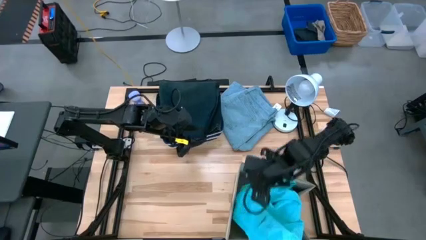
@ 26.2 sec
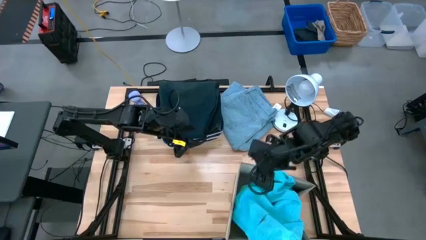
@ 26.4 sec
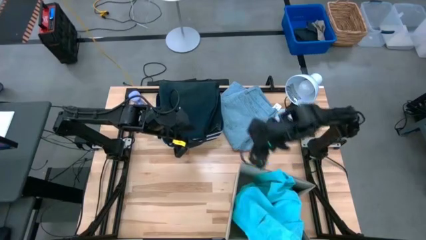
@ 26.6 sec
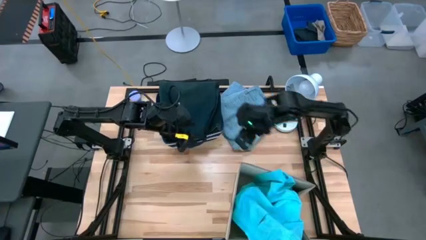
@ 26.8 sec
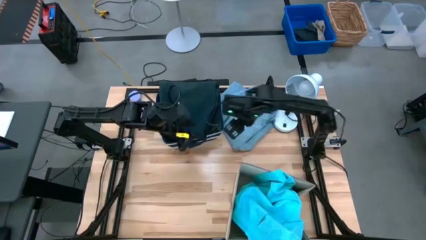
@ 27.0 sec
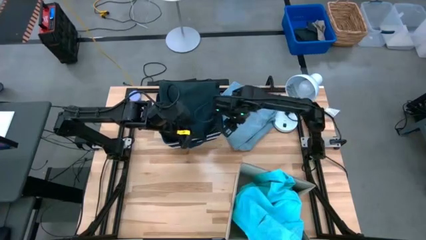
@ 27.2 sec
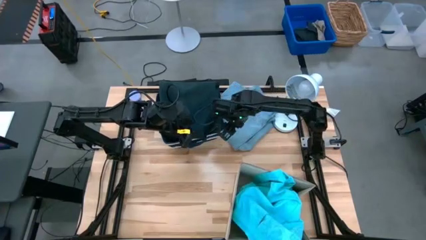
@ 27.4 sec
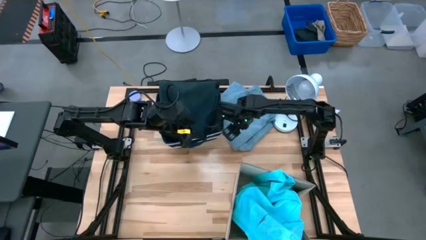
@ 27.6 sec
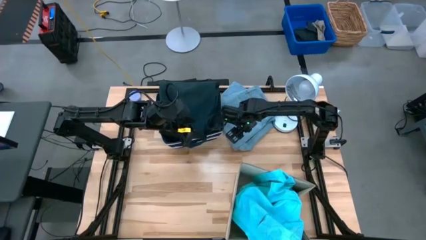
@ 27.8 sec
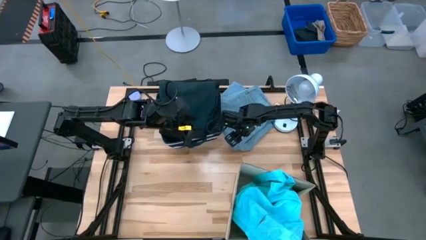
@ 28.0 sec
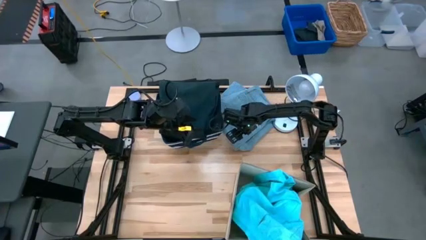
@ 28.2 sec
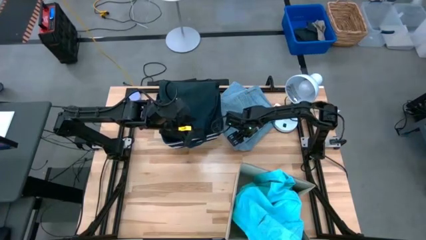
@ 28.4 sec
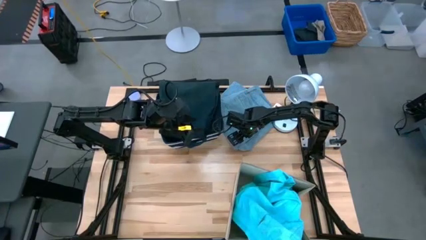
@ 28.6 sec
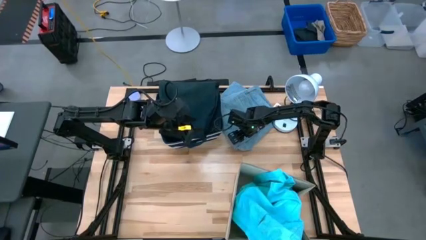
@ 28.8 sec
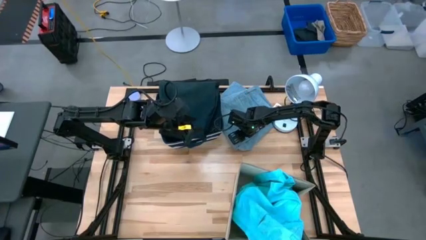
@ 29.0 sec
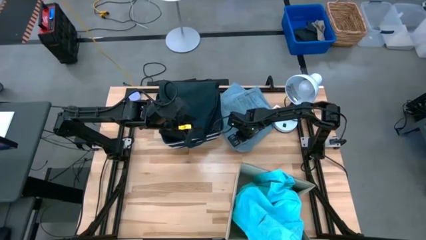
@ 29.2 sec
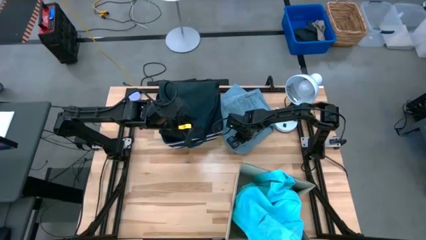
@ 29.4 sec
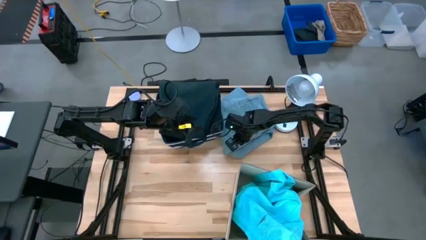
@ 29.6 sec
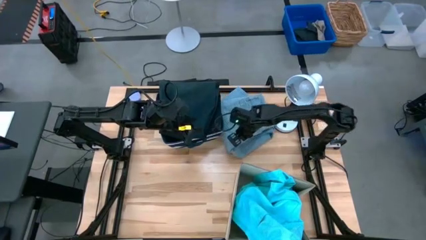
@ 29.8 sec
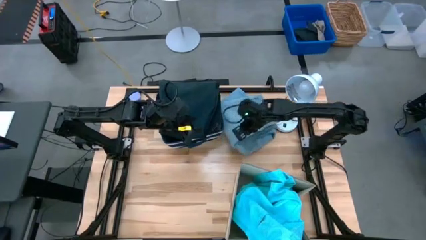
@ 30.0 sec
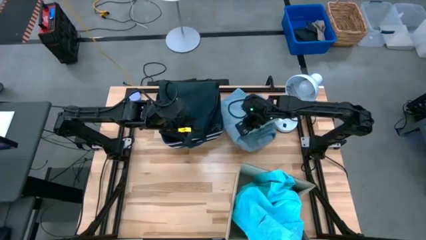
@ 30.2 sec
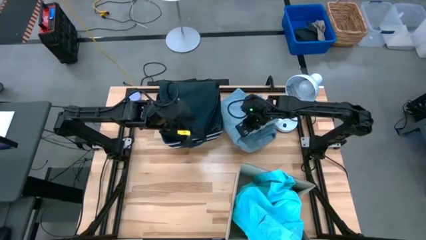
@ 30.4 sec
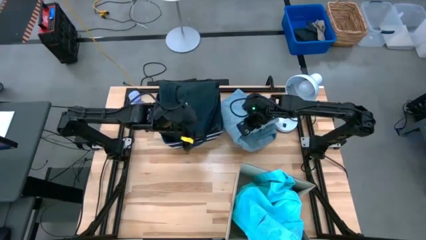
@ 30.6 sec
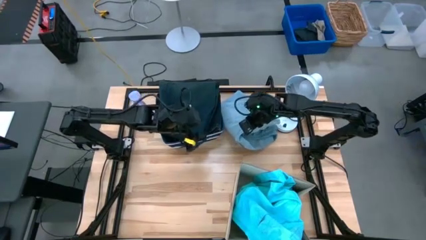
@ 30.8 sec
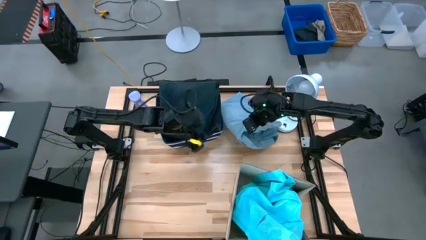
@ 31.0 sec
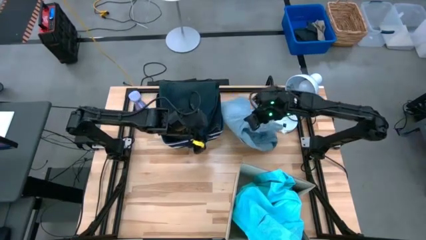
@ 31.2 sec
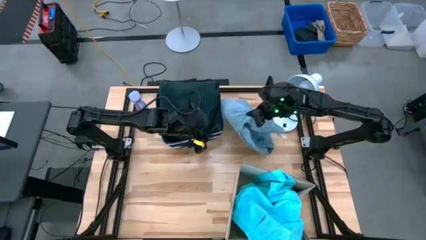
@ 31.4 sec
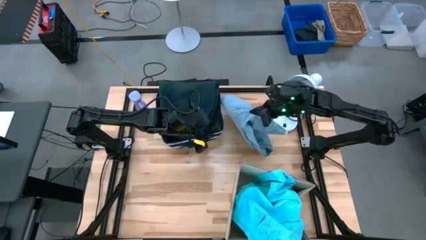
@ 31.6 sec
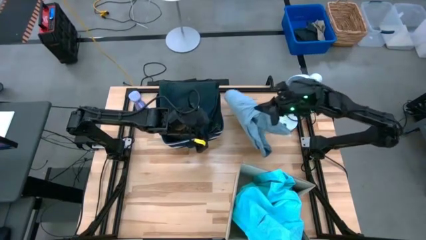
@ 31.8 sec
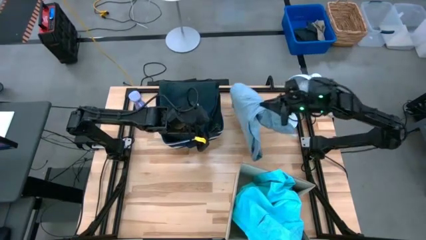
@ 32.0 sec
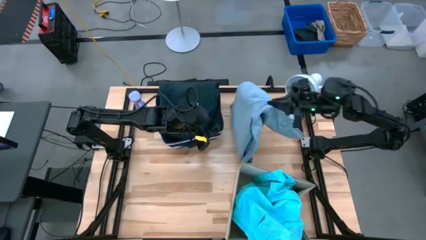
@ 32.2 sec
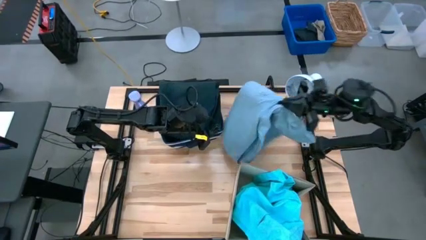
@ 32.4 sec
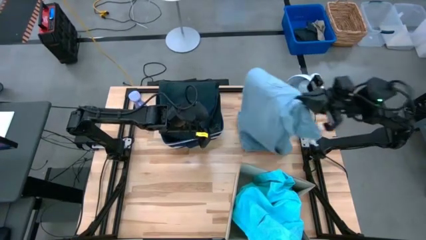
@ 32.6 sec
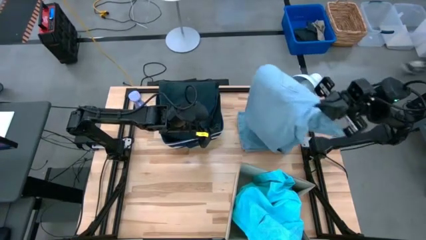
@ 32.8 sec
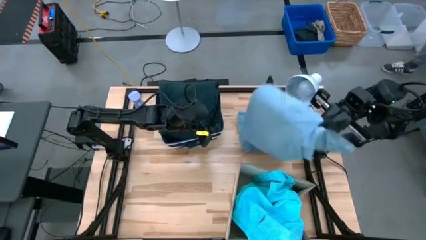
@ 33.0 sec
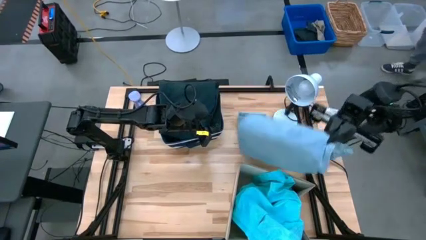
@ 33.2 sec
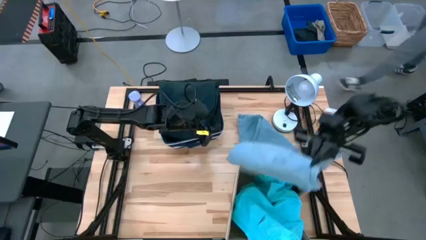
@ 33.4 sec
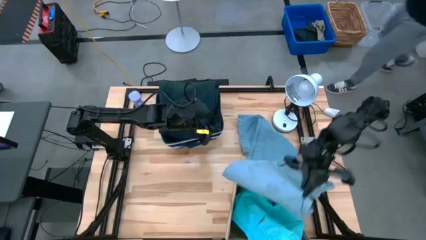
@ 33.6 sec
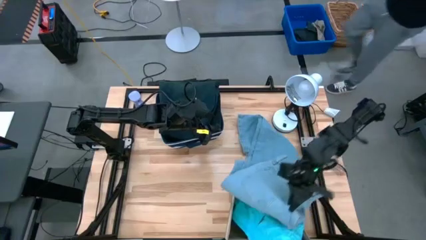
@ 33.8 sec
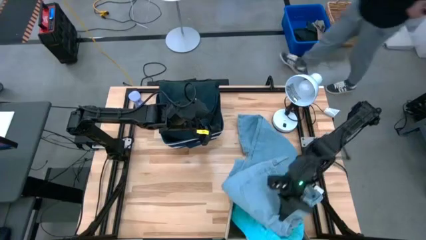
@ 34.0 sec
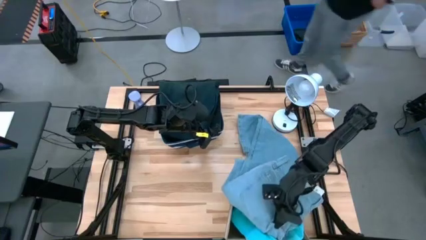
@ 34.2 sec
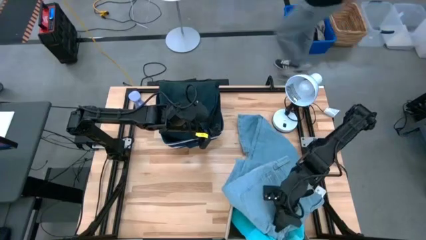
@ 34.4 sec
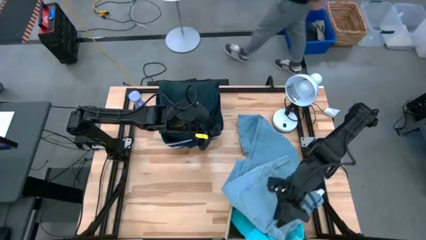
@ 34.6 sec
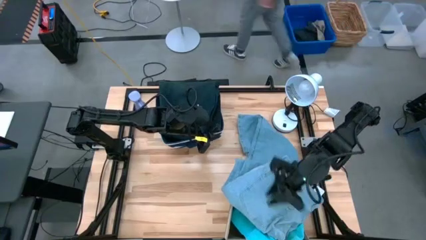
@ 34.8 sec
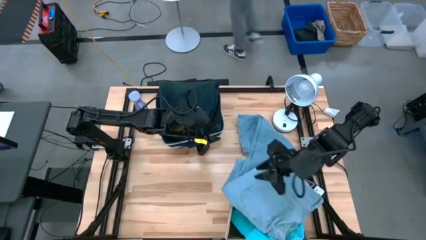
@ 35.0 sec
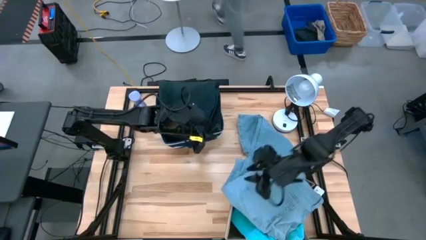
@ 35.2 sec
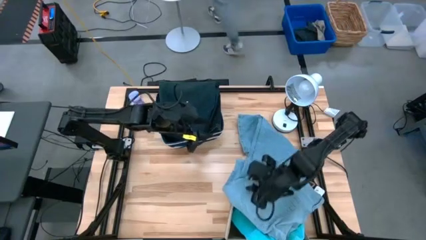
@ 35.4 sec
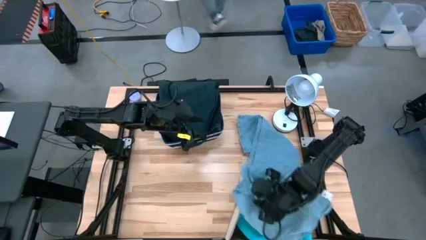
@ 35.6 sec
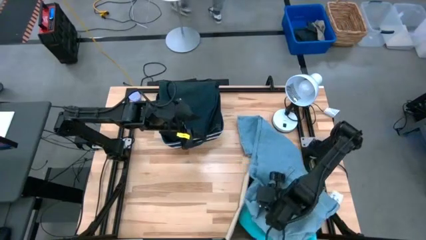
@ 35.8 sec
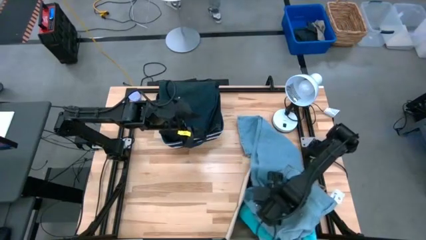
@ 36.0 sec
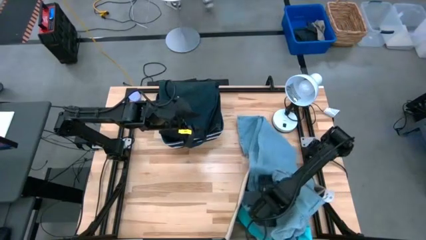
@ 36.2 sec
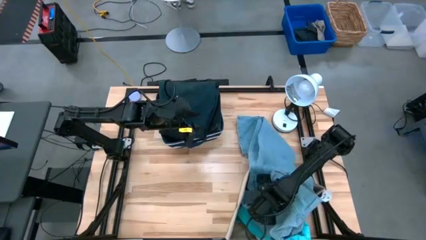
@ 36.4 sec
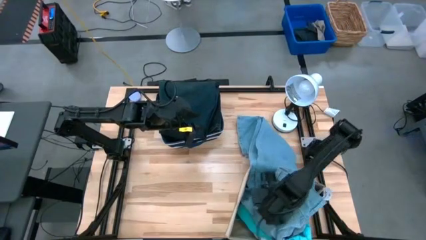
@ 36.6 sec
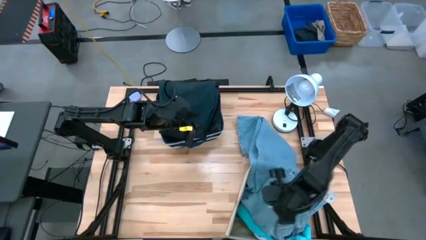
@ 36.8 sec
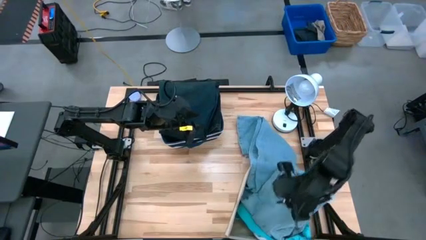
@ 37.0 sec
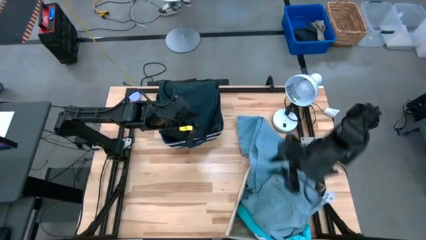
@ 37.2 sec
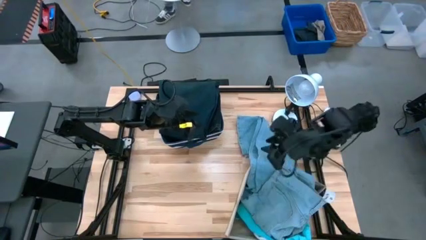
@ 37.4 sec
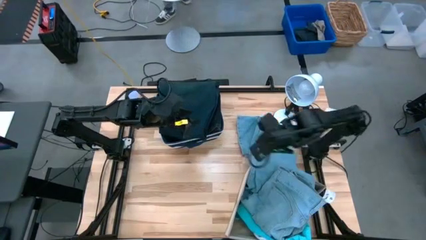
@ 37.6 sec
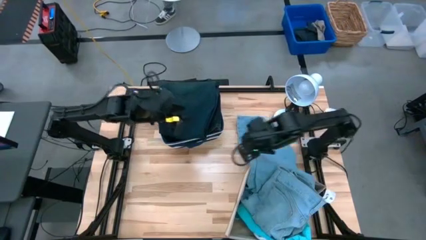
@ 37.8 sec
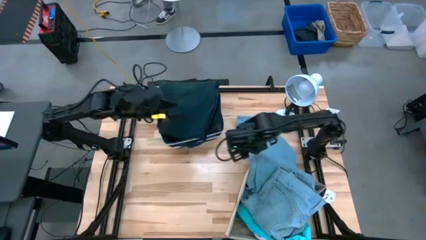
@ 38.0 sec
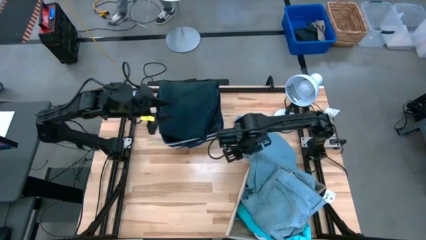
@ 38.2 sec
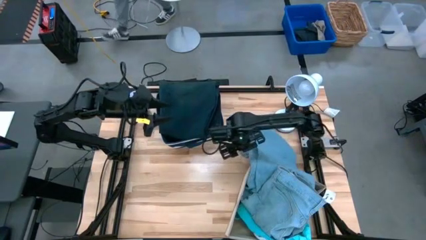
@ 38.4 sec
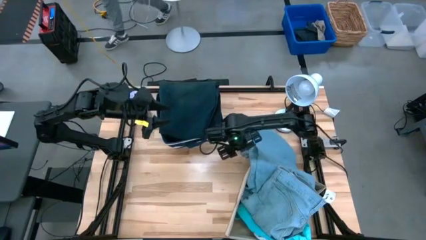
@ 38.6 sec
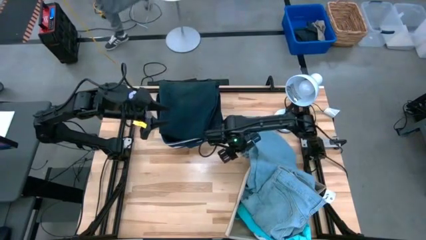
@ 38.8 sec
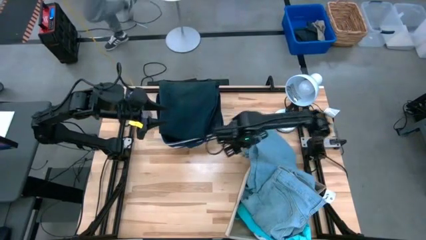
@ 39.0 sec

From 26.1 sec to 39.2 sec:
Task: Sort clothes
Put the blue pants into the white laundry organizer
